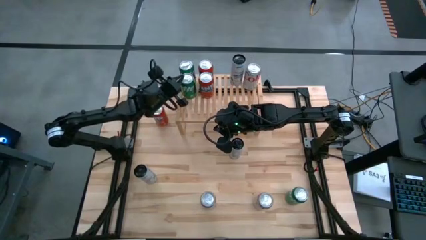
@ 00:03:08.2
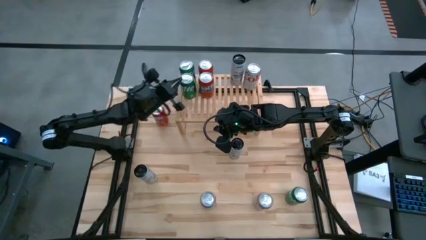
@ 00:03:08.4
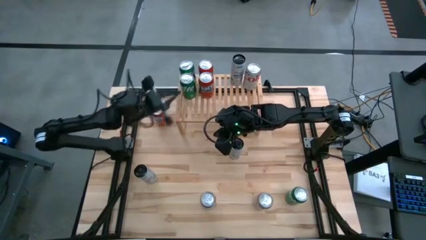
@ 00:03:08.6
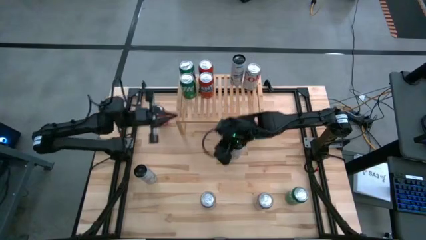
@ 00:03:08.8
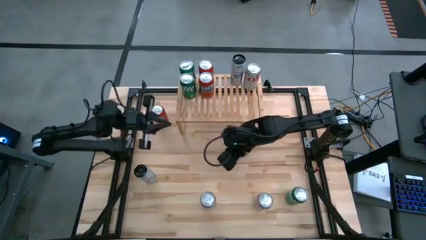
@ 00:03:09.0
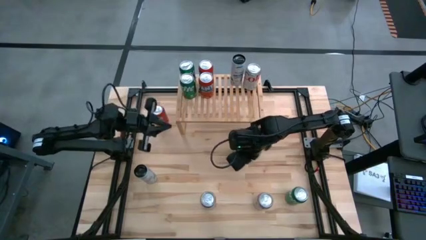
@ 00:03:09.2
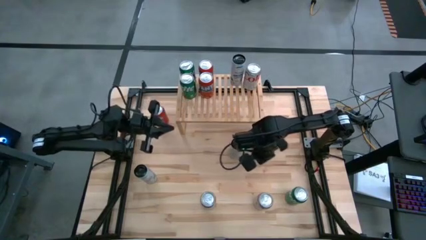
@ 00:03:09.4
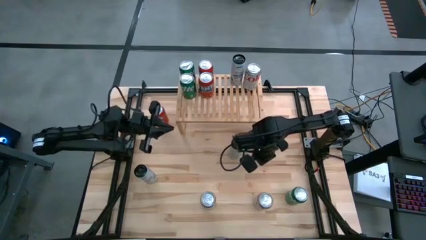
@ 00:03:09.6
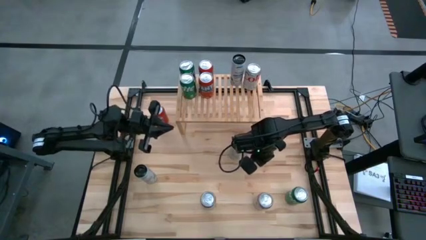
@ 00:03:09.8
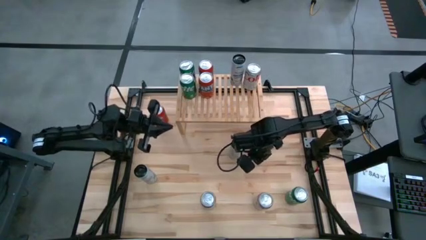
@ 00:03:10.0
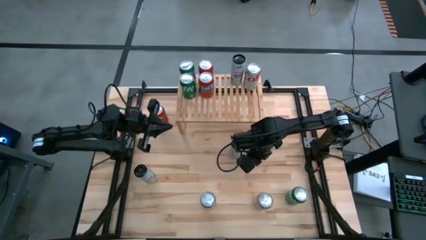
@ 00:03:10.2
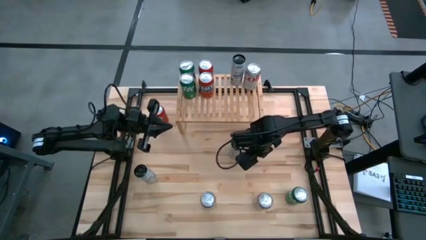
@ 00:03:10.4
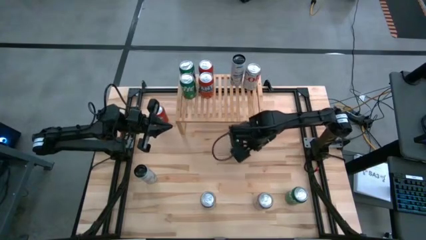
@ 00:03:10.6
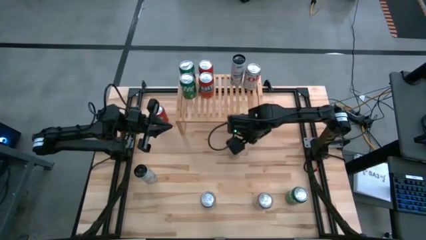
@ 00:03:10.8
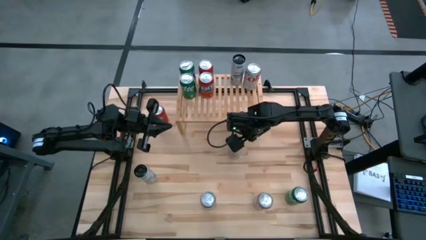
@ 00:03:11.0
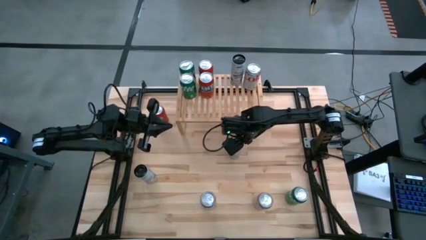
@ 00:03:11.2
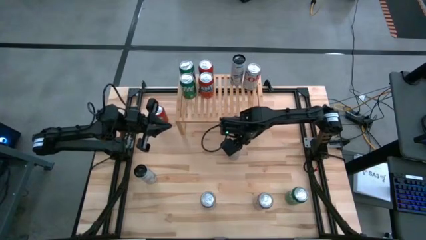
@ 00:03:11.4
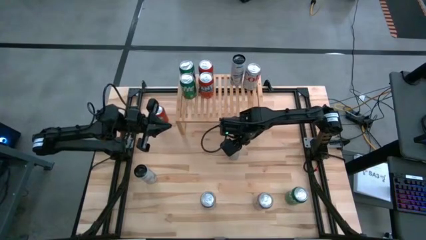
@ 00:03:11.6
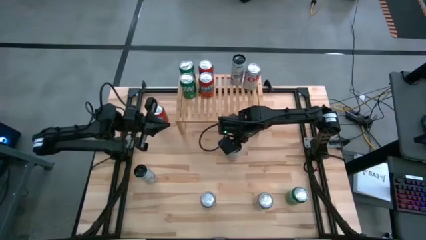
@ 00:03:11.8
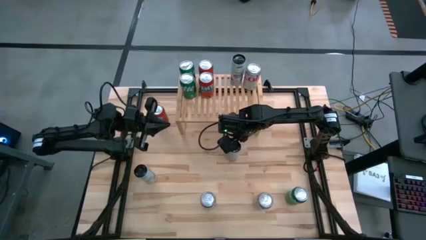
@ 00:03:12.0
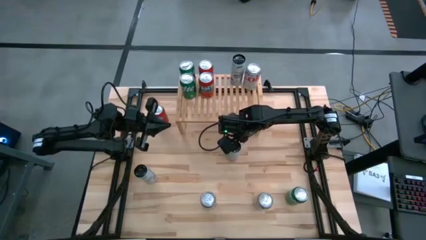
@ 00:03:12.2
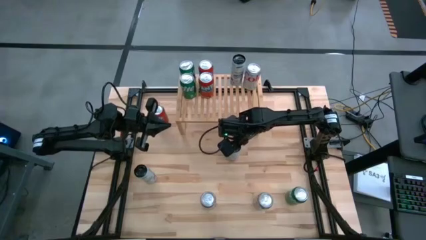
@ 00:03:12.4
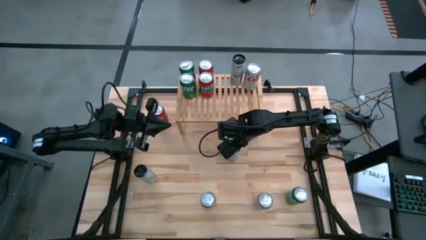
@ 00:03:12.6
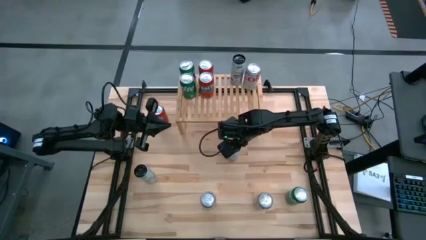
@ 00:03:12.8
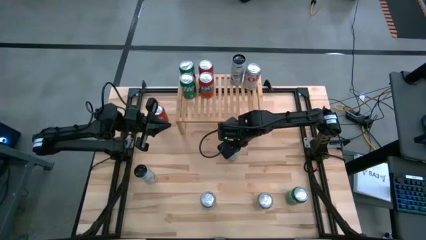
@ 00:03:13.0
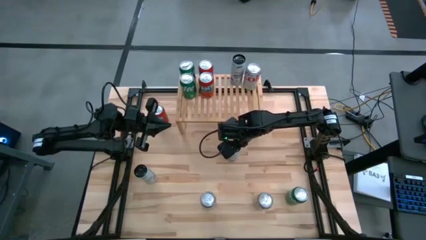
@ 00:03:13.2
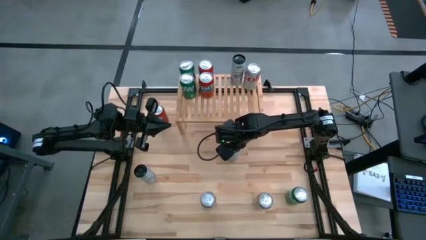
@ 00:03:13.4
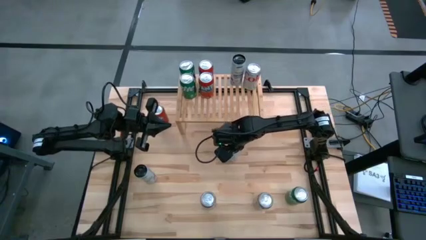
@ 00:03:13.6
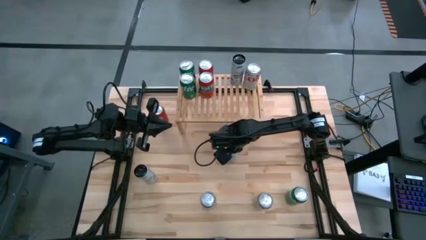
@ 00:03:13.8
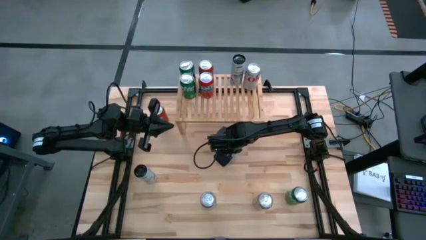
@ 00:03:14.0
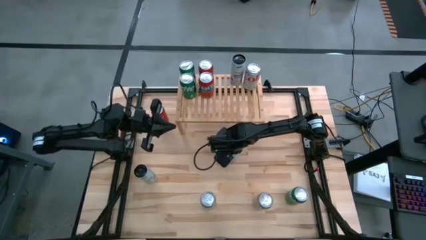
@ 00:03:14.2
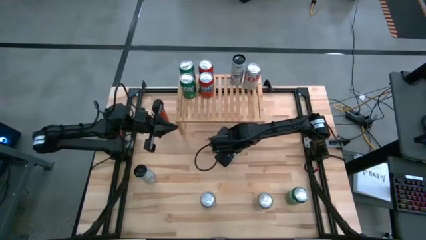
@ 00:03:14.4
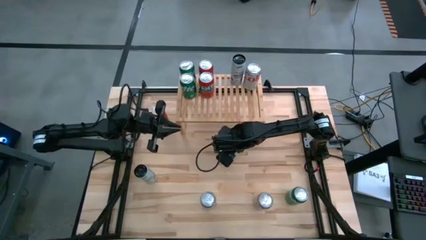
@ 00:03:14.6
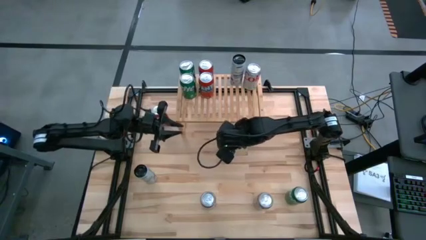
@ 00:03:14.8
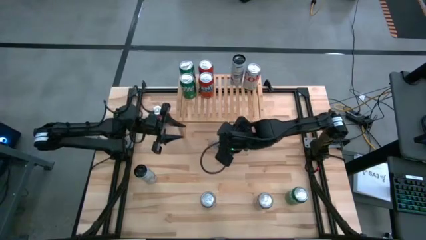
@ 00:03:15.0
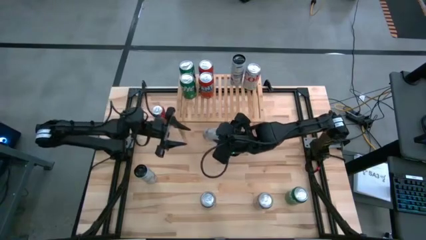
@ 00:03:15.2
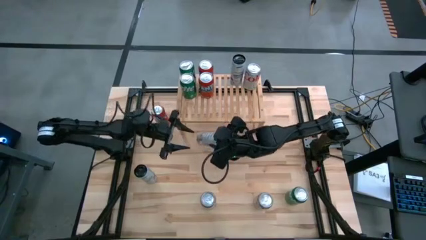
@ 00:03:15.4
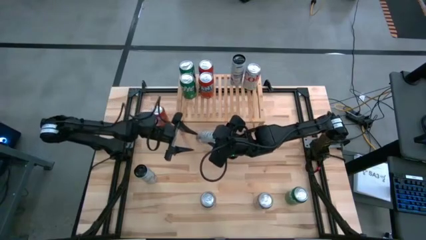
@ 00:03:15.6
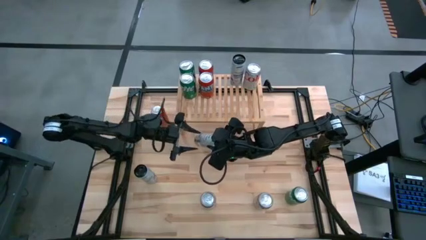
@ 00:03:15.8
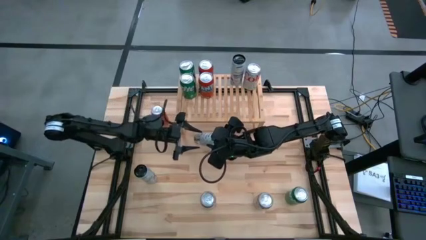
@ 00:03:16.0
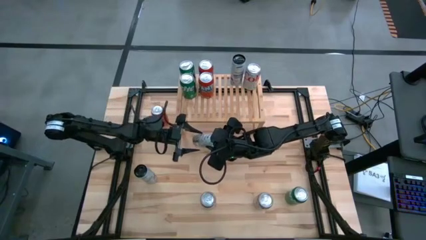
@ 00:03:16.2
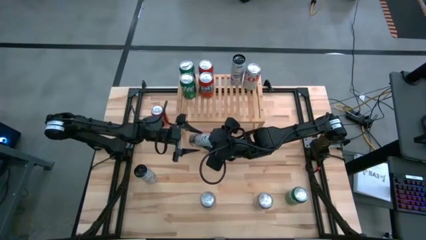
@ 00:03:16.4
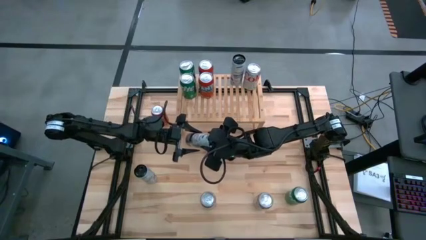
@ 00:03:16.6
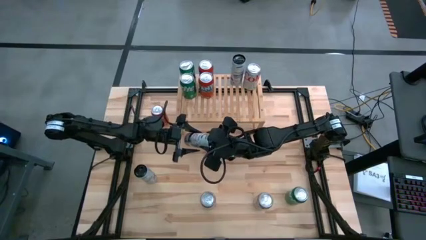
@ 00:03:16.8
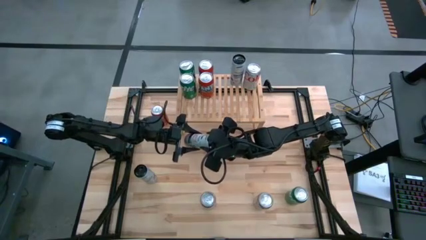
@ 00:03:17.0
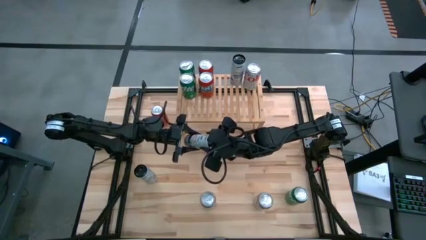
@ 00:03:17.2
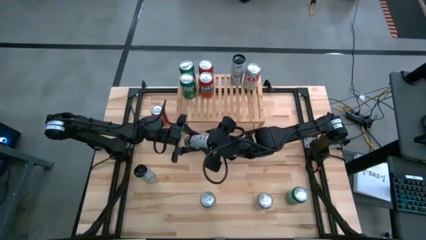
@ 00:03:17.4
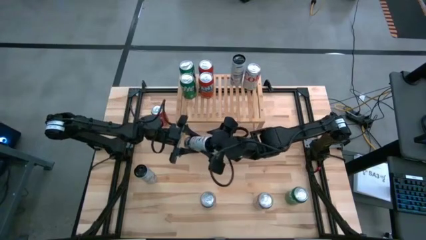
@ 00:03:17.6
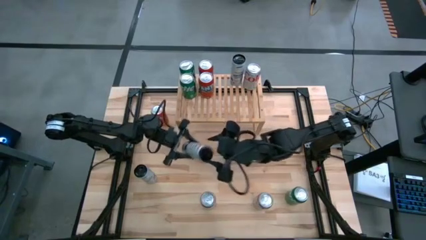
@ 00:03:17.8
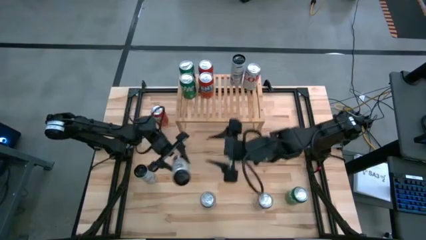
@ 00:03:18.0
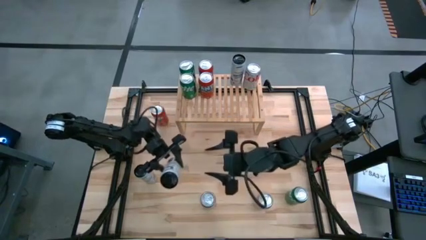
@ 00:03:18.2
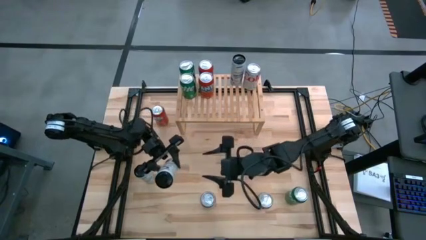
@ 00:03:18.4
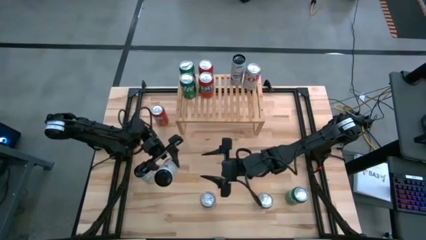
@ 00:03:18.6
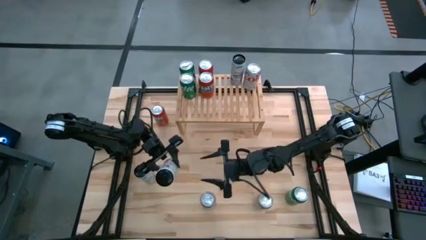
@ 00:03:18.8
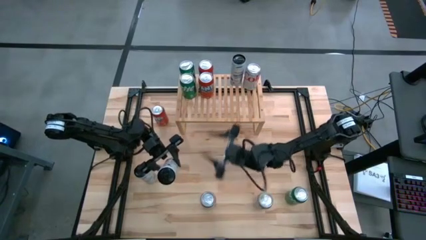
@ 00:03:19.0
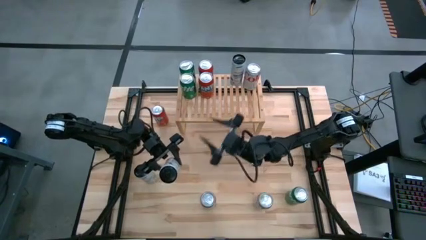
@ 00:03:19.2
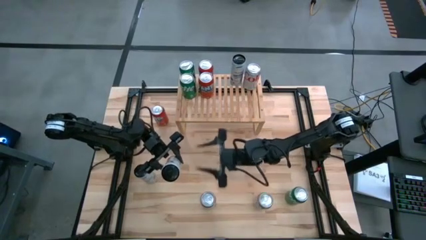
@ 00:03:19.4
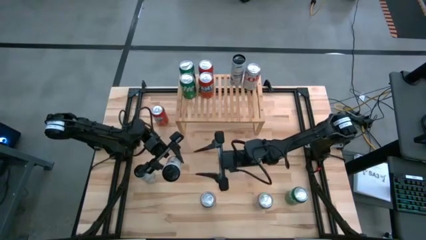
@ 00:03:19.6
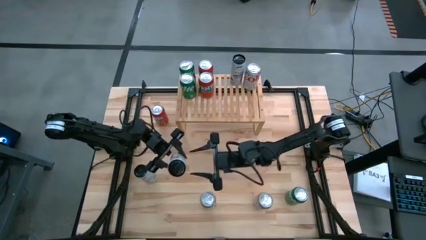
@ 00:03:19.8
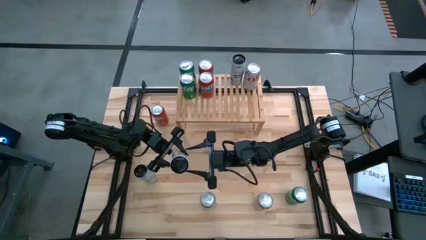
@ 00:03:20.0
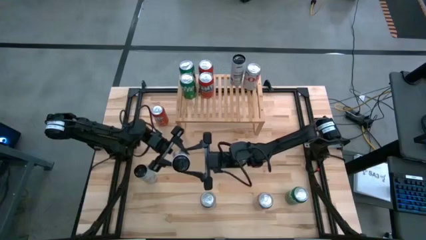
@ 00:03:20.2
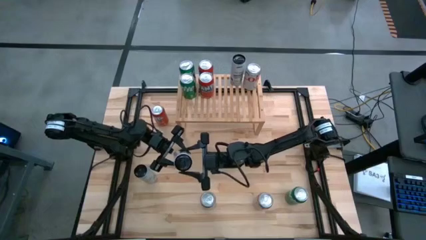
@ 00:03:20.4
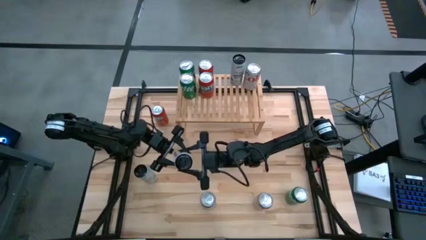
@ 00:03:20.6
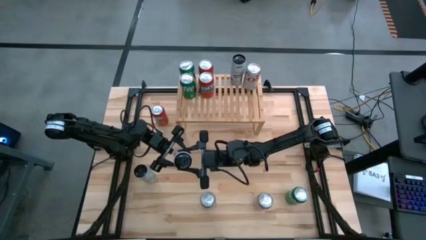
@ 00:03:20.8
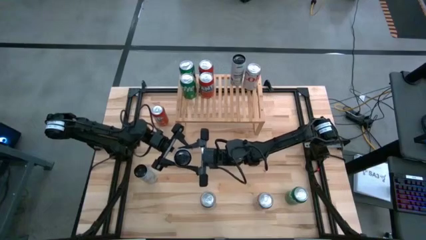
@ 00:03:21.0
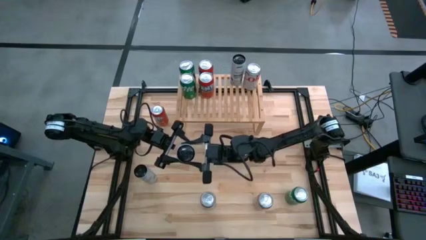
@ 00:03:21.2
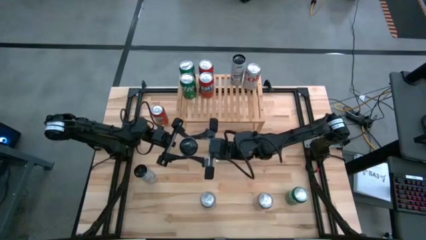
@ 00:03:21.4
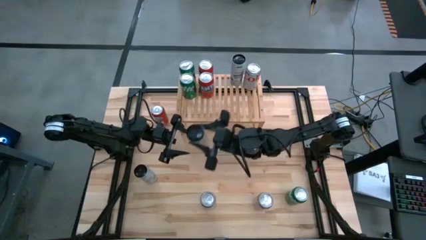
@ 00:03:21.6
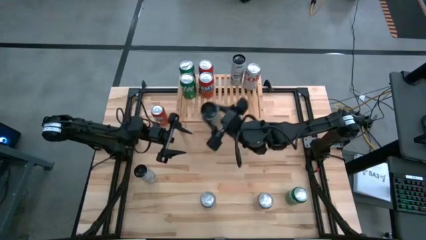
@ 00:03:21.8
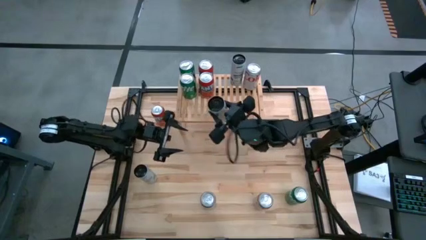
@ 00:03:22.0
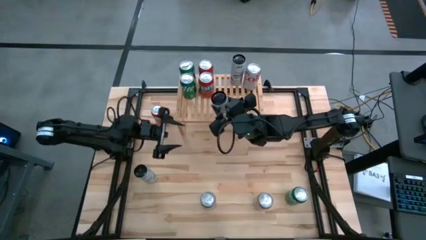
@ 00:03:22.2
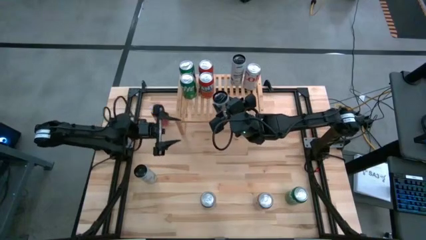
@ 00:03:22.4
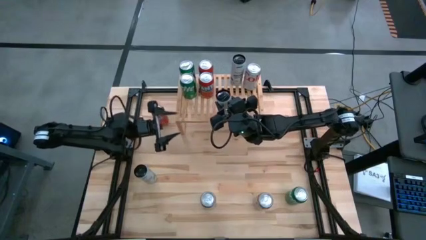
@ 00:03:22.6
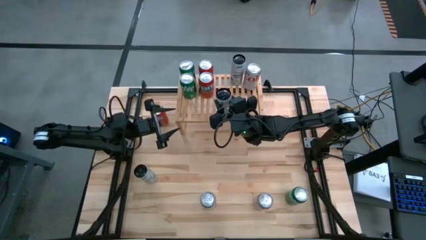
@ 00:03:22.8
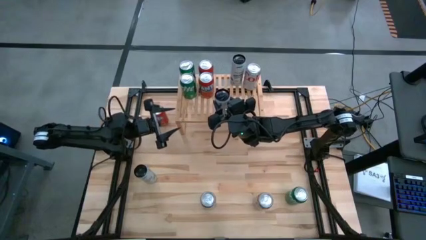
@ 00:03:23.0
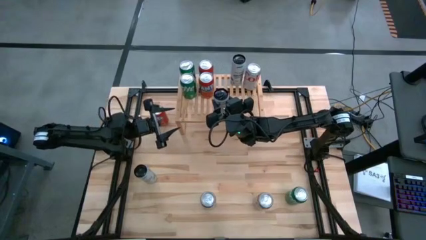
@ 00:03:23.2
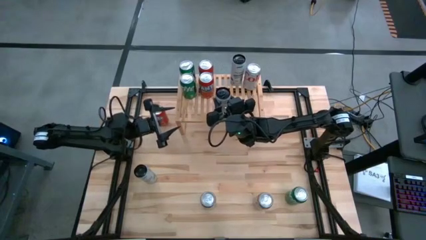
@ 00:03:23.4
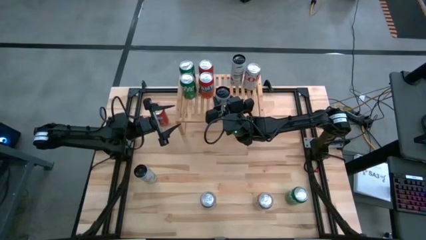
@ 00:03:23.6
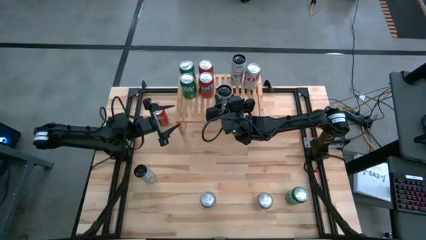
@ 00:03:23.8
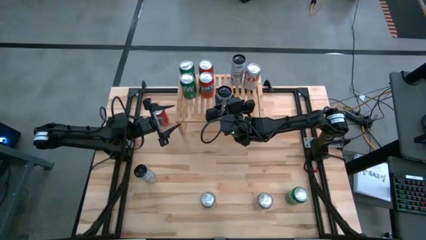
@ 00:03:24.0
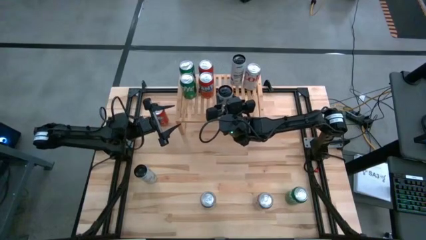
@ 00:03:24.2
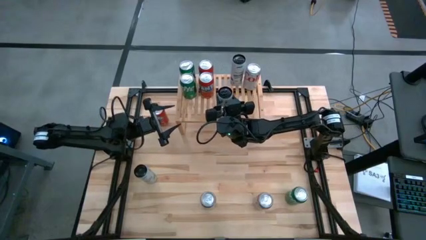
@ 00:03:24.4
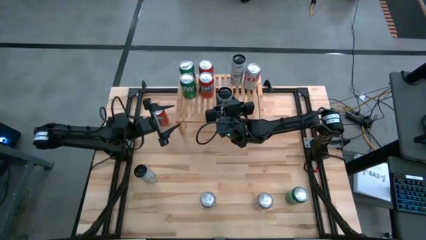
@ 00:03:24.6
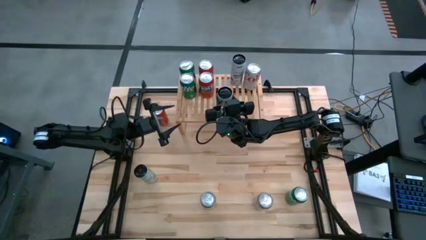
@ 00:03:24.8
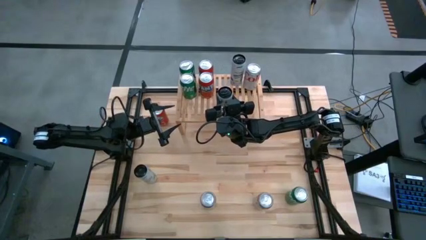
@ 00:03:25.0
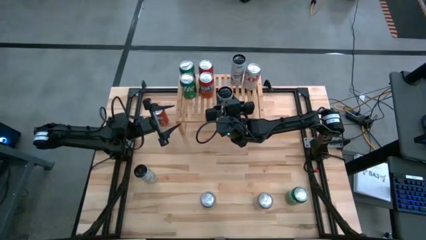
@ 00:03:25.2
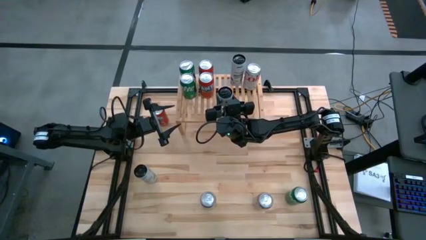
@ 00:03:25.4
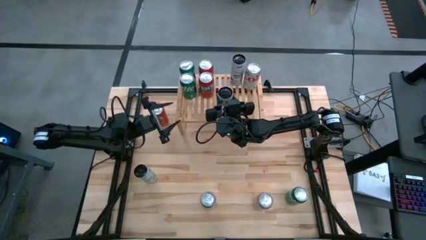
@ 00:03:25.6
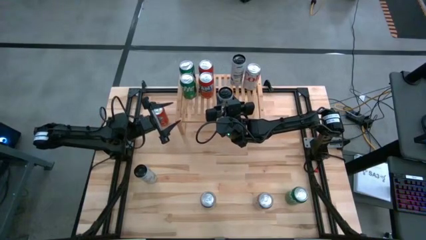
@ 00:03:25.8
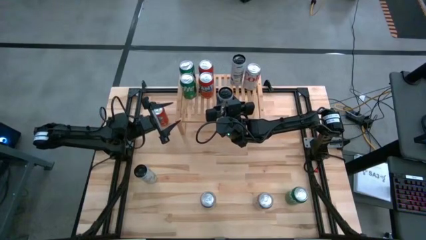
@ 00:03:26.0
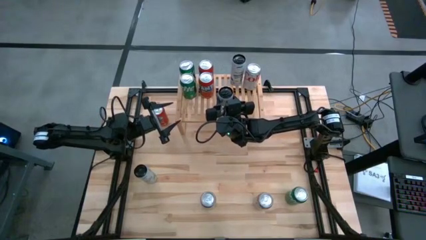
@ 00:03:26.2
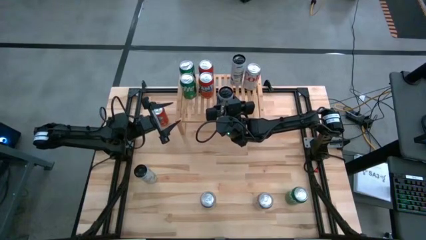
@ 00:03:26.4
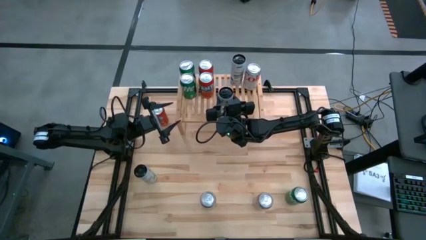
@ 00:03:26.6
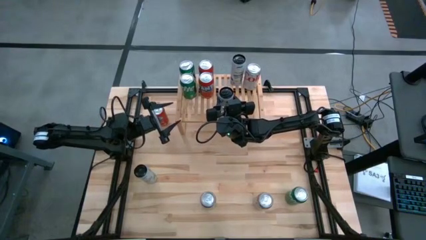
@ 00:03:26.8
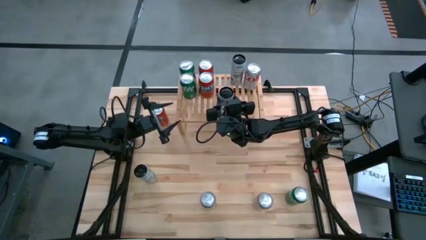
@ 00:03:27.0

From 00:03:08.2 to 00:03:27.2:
Task: Place canned beverage on shelf
Put the white yellow soda can on the shelf
